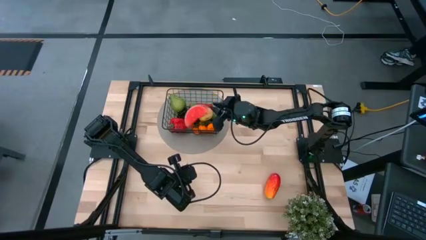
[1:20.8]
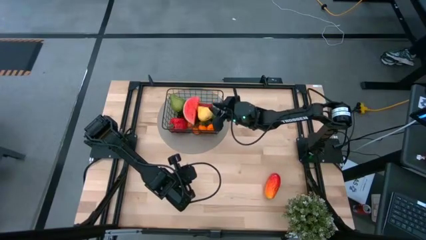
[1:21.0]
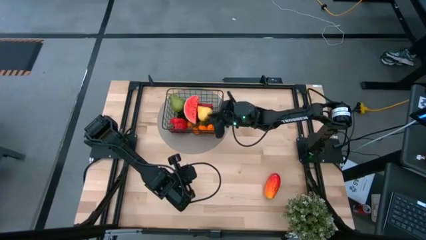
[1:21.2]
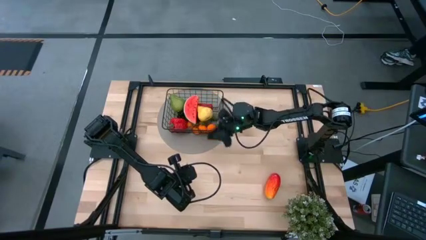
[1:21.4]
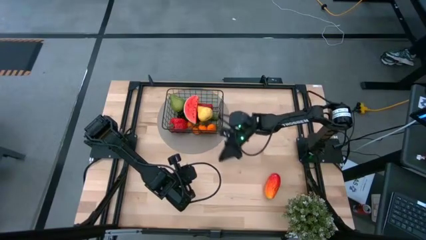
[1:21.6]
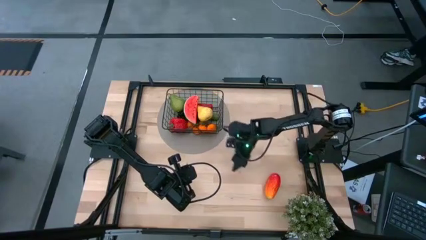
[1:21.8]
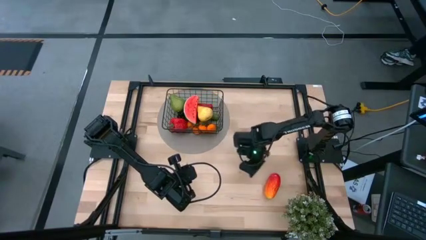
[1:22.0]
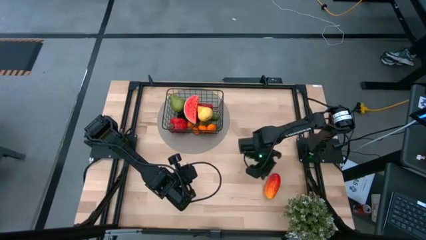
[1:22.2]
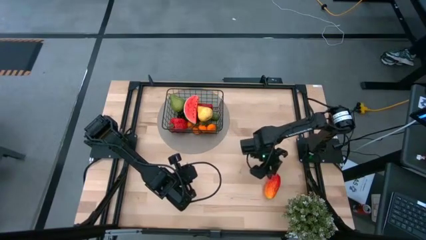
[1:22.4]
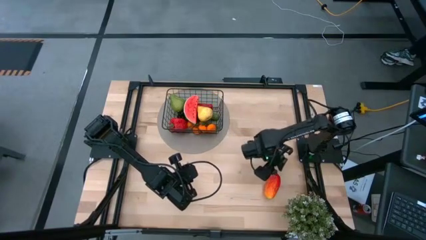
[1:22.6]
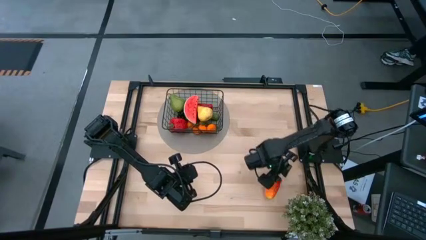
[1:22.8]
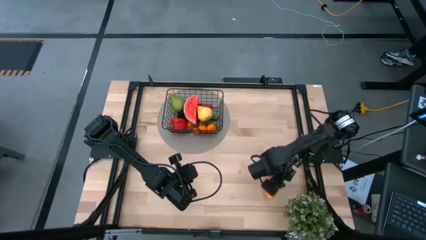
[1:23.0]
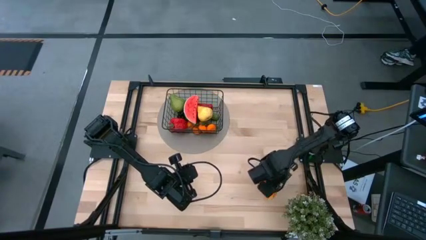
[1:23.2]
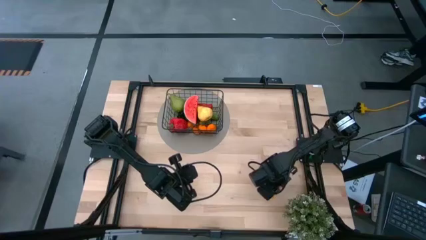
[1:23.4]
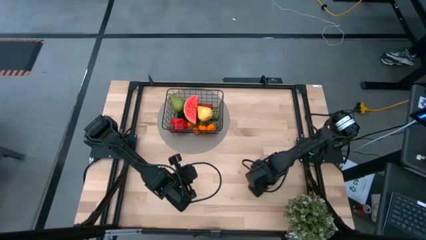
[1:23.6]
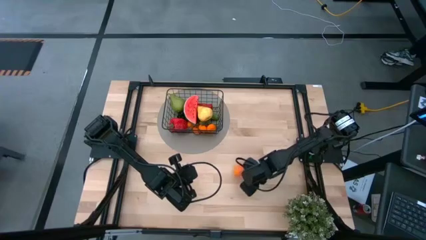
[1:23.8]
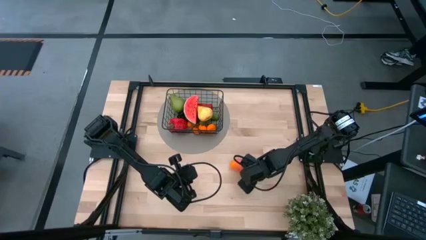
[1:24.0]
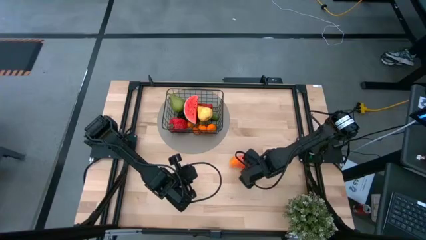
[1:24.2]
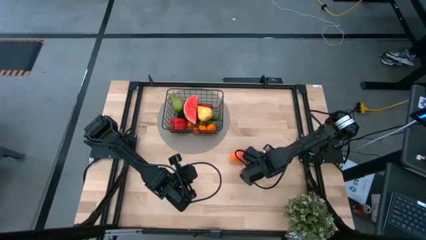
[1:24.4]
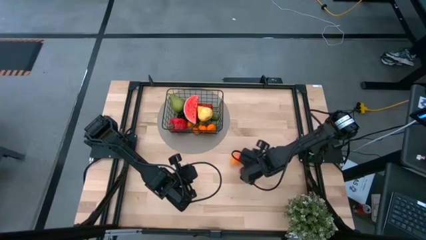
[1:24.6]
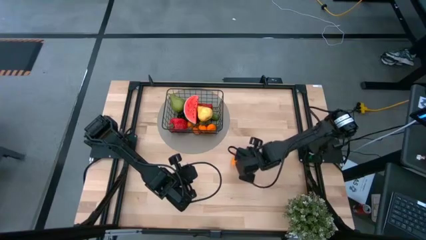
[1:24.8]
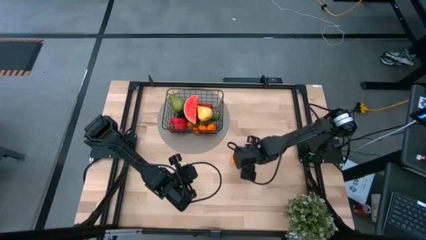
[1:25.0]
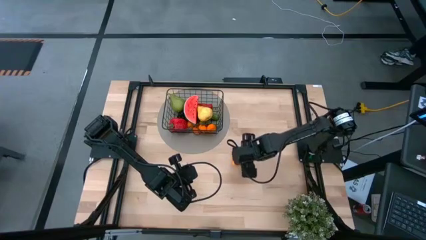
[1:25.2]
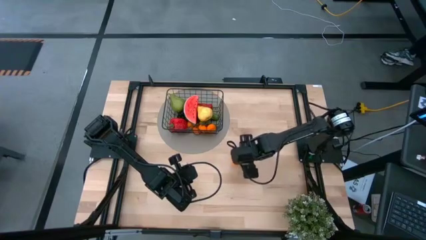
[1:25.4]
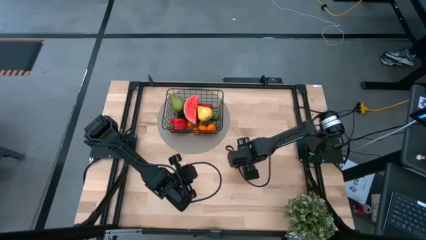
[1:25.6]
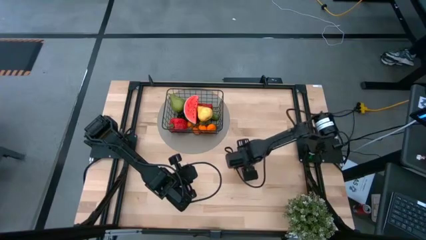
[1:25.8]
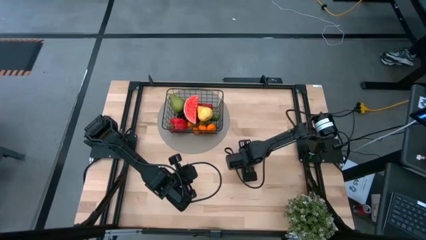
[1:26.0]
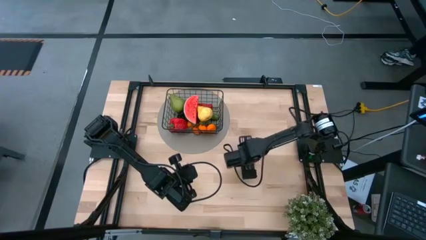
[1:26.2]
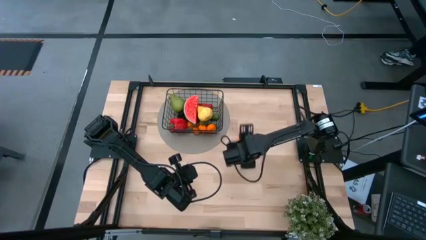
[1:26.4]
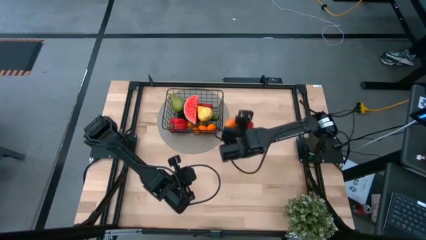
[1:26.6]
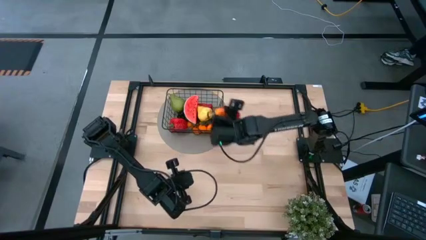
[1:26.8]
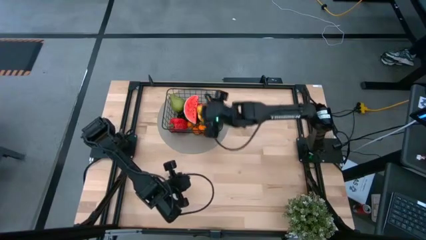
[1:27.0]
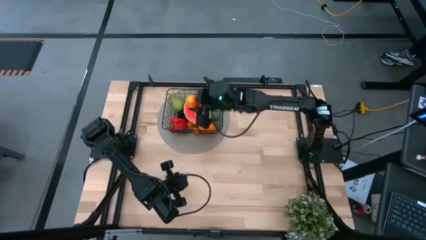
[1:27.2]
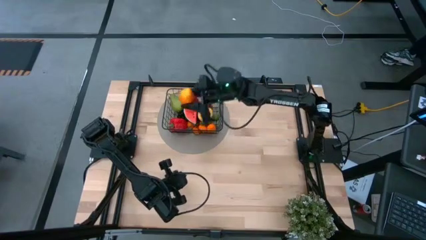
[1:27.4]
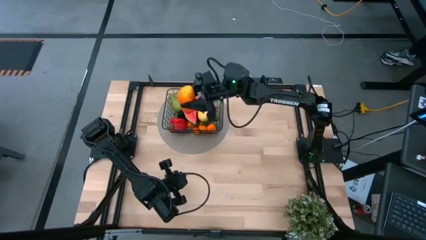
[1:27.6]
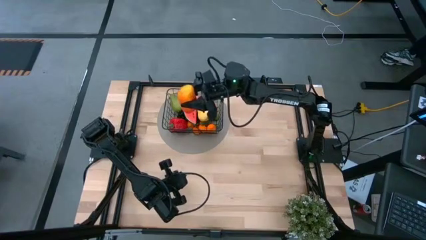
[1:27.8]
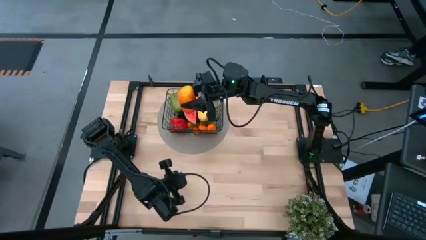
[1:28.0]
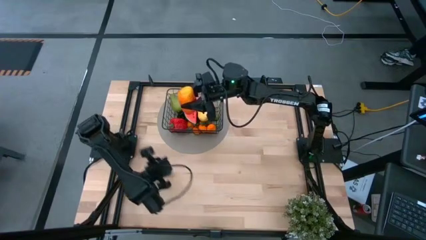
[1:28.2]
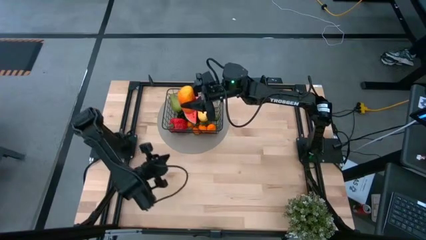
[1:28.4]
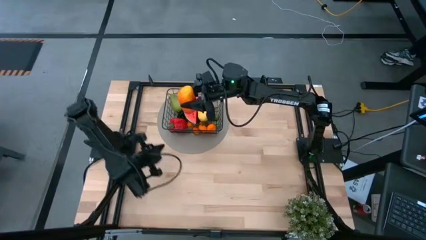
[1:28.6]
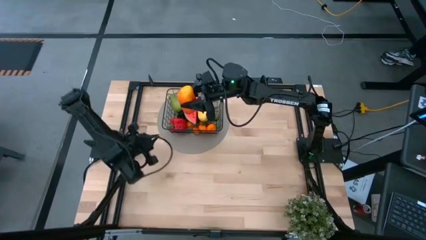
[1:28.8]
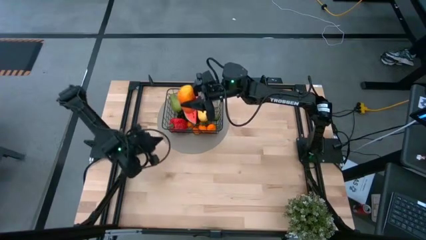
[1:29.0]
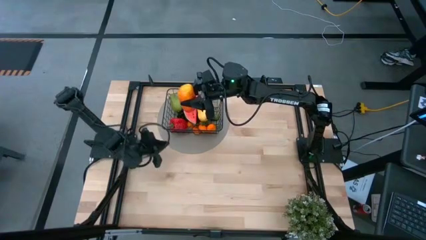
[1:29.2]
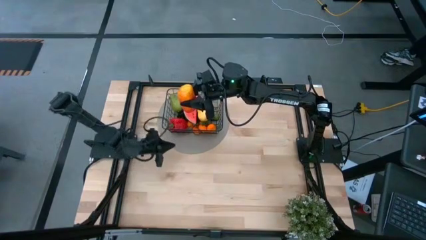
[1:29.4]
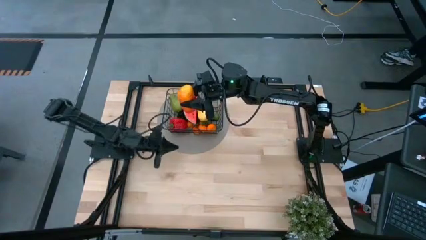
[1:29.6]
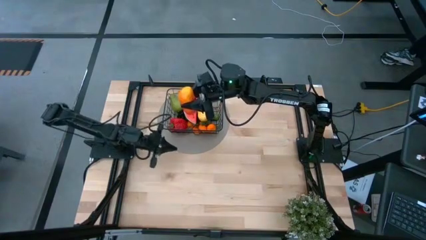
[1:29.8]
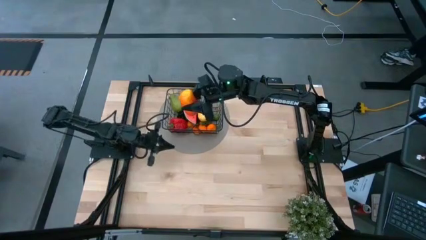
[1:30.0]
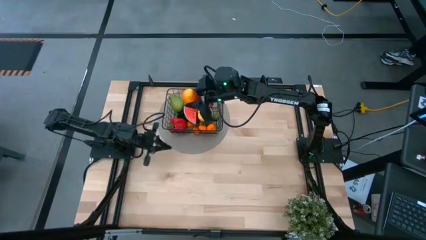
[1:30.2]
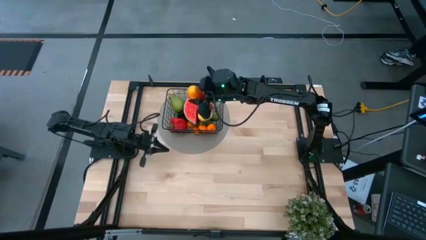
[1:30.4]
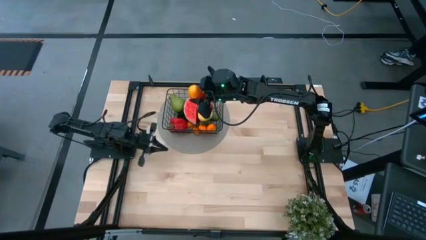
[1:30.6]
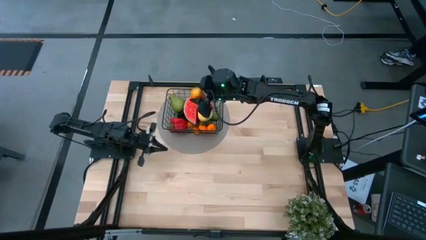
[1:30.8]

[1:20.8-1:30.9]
Task: Build produce basket
Put the orange mango into the wire basket

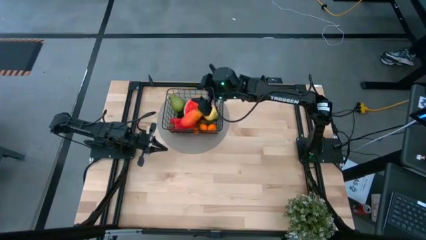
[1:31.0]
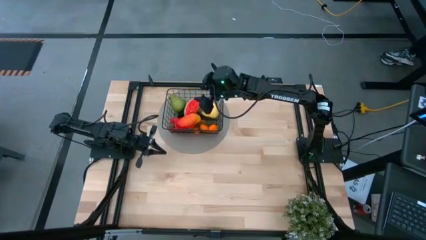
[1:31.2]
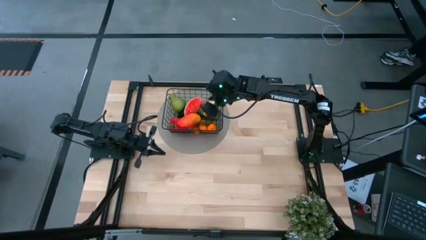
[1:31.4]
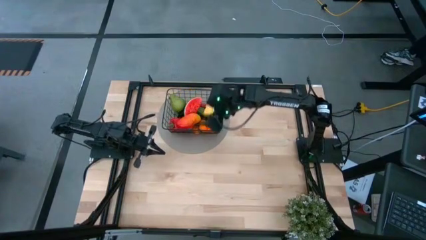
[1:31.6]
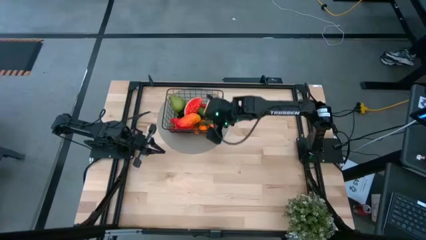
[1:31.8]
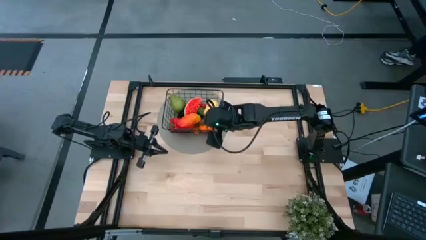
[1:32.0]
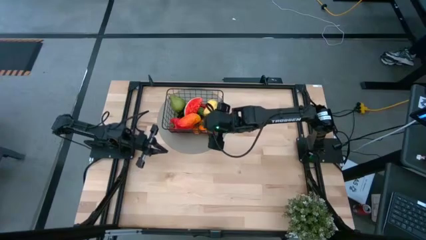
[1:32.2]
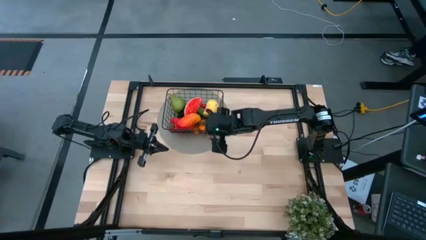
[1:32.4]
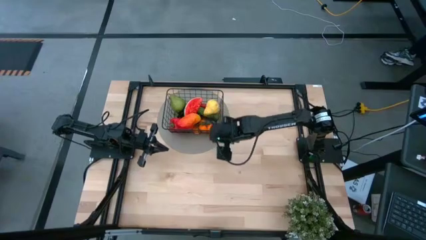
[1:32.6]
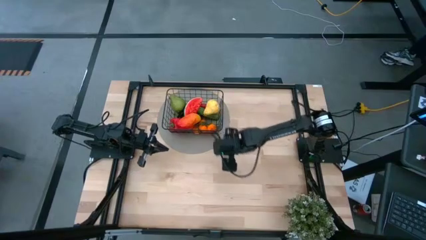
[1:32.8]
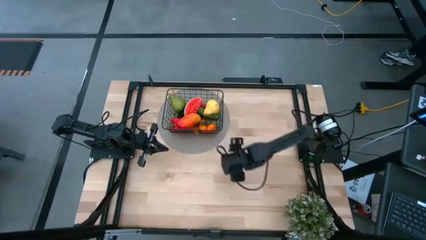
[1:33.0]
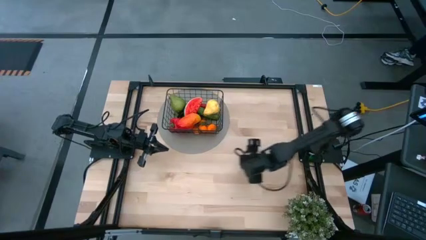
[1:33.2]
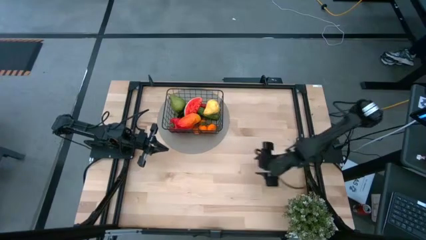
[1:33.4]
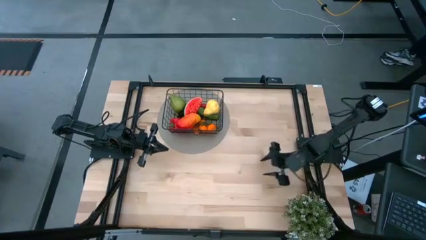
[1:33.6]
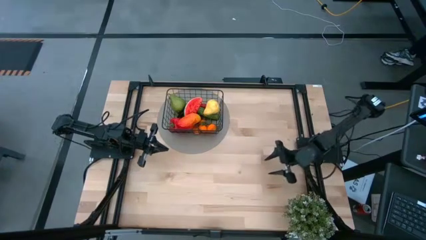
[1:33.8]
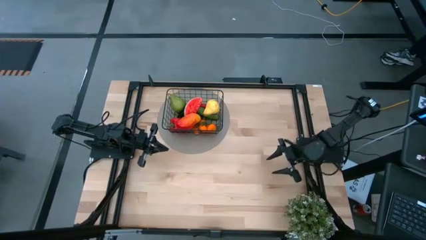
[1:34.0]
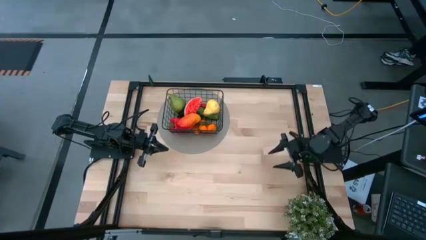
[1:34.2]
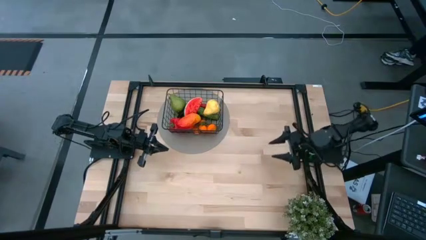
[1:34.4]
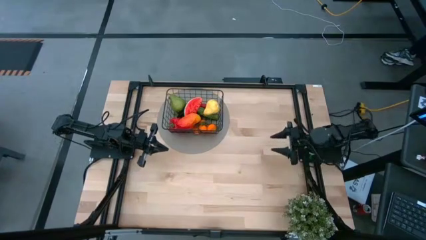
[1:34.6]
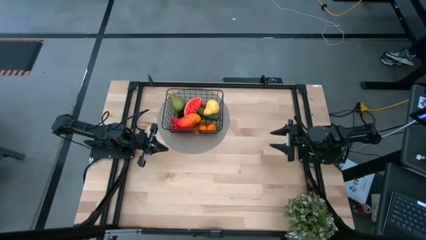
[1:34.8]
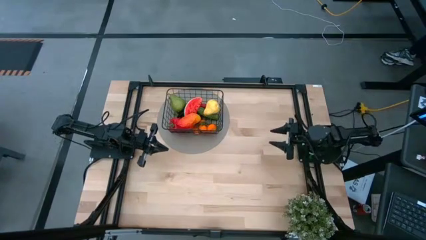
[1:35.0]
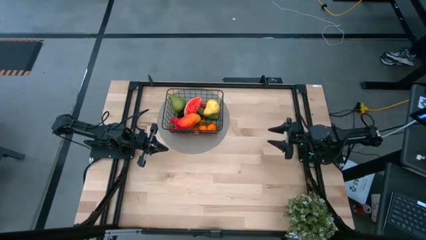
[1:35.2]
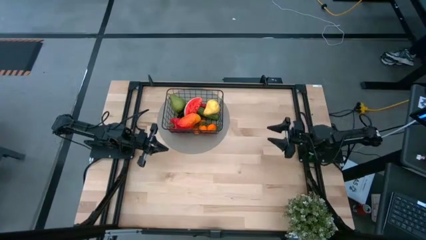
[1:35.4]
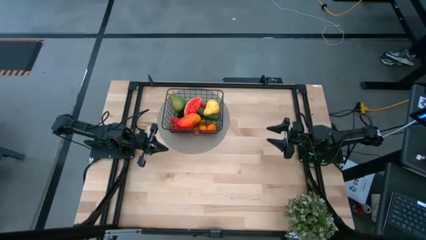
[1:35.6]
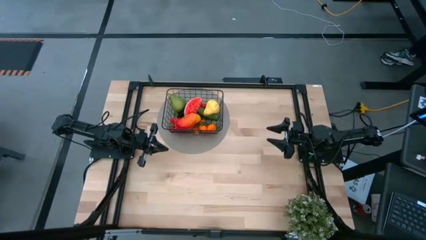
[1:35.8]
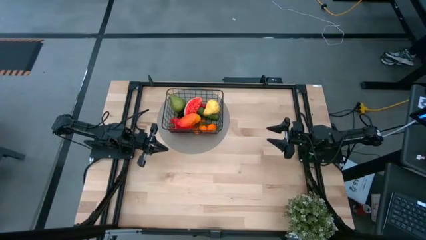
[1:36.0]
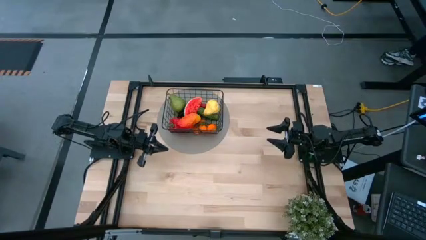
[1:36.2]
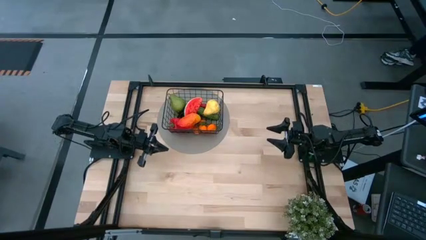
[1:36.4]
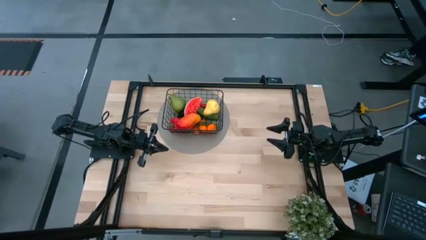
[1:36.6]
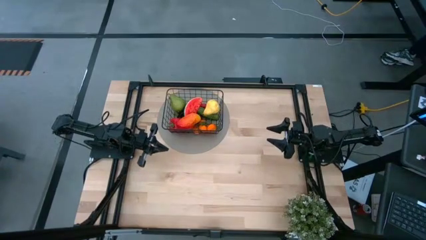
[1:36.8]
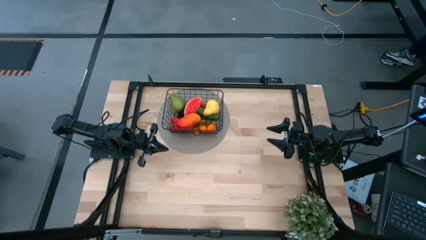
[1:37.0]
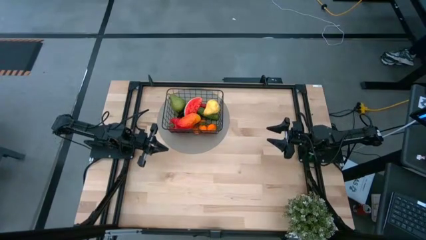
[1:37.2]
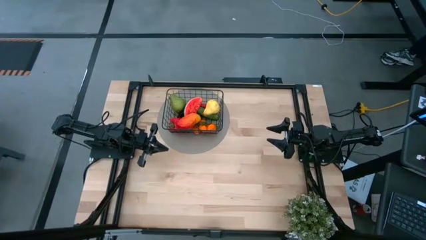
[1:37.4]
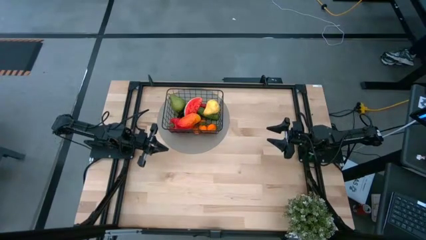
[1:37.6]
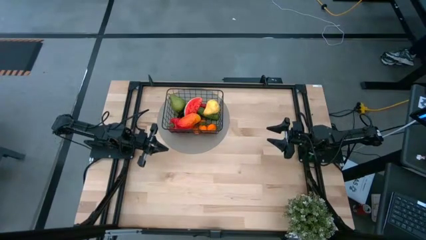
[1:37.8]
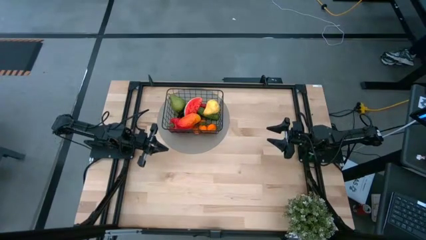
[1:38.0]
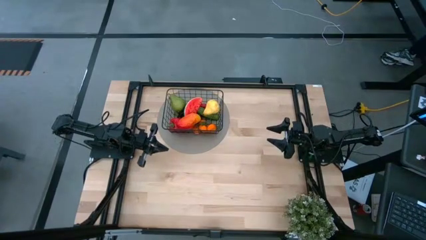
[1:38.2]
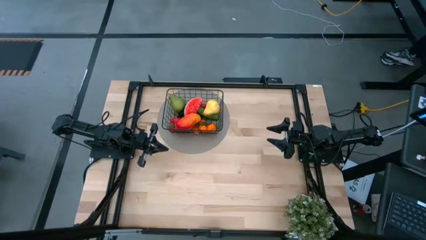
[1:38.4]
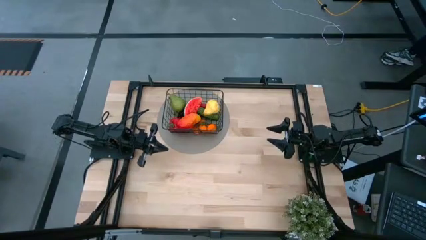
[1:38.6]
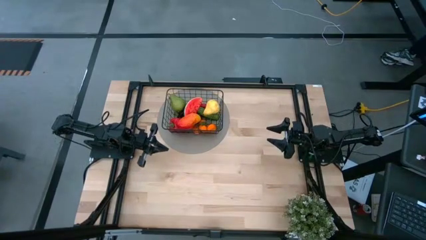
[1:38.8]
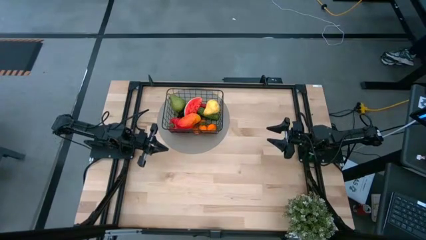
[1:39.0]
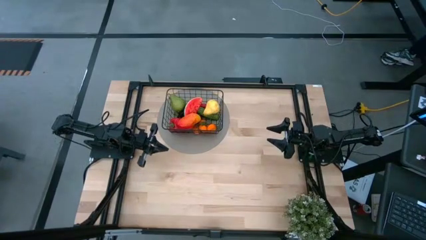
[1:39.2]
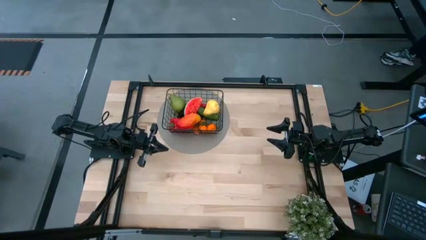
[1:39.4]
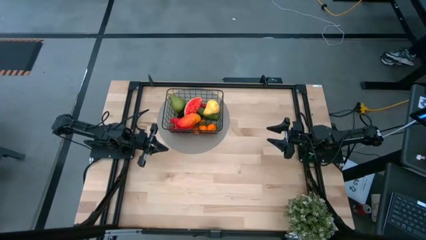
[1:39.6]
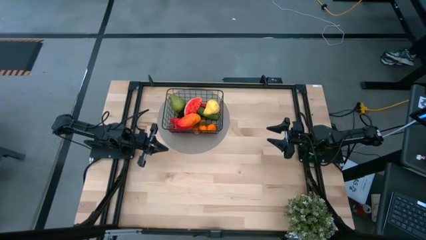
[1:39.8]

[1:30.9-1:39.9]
Return to Home Position
